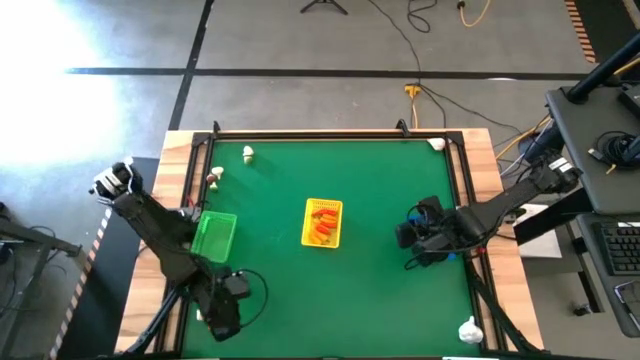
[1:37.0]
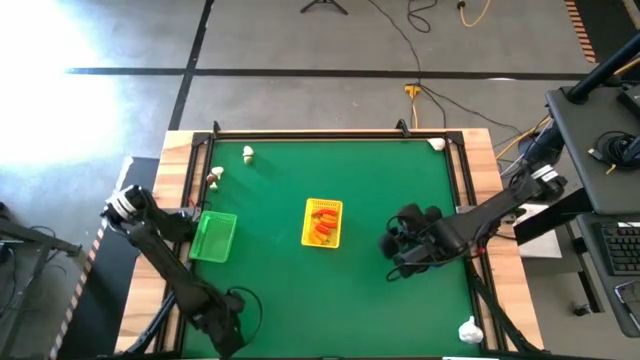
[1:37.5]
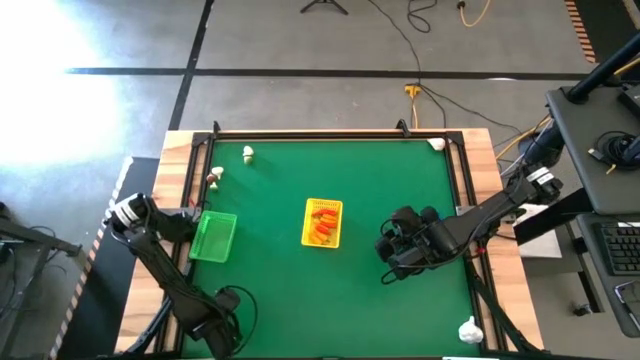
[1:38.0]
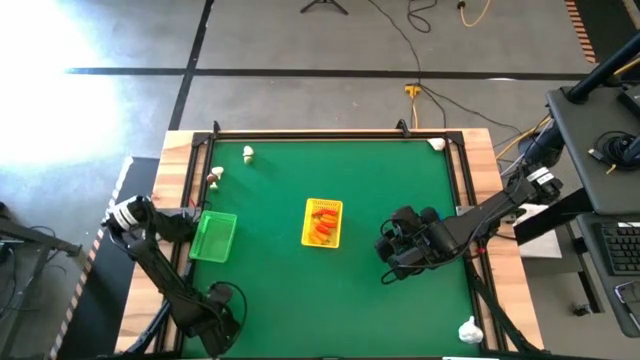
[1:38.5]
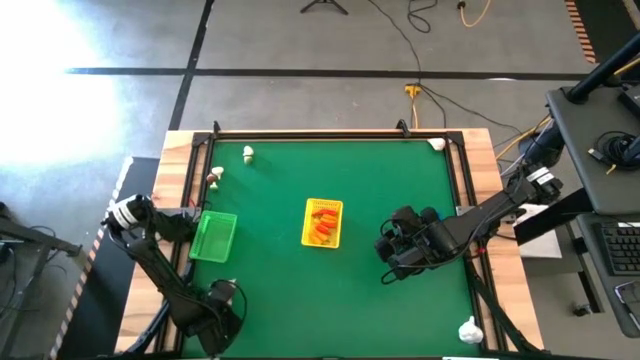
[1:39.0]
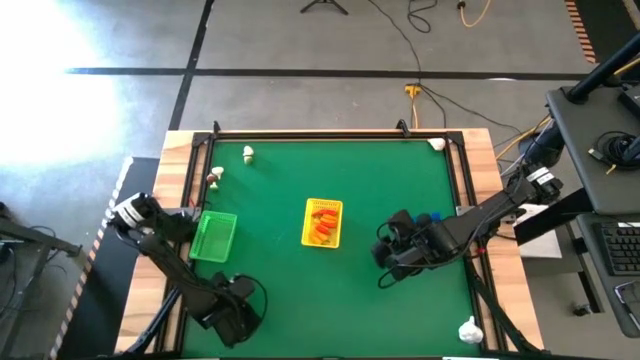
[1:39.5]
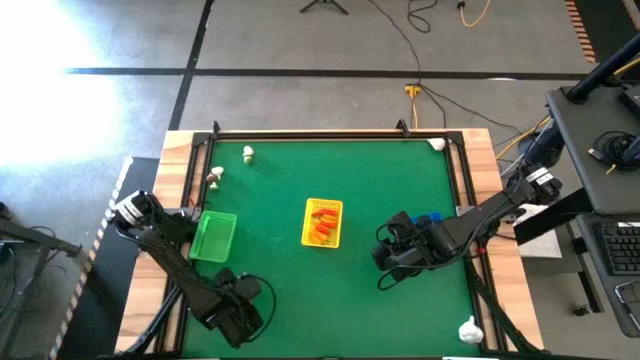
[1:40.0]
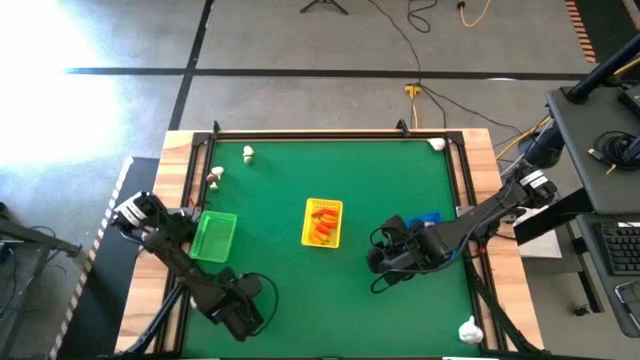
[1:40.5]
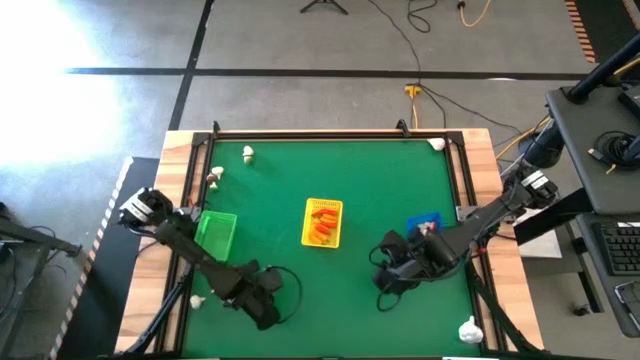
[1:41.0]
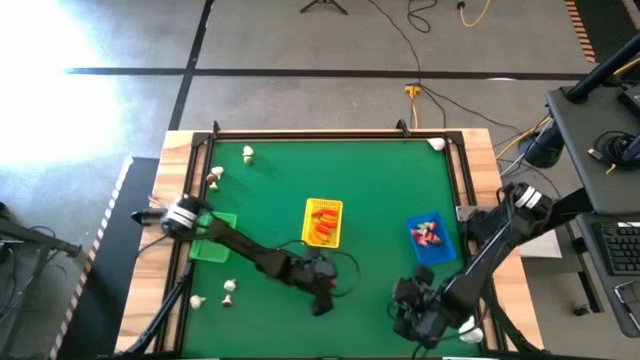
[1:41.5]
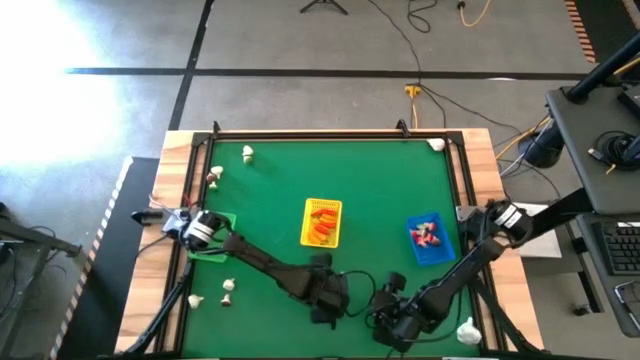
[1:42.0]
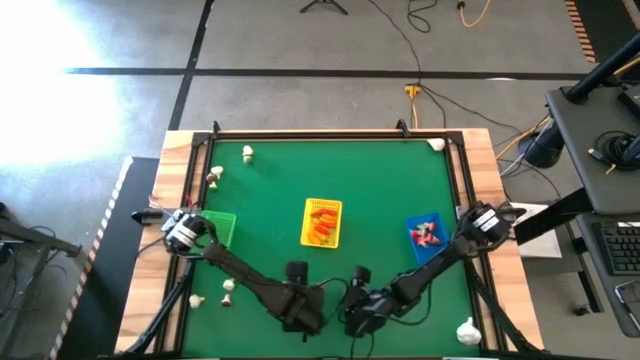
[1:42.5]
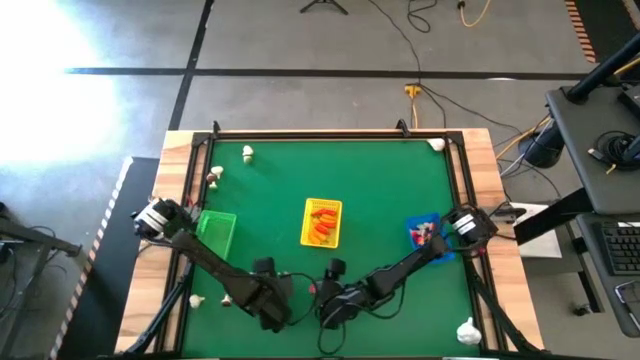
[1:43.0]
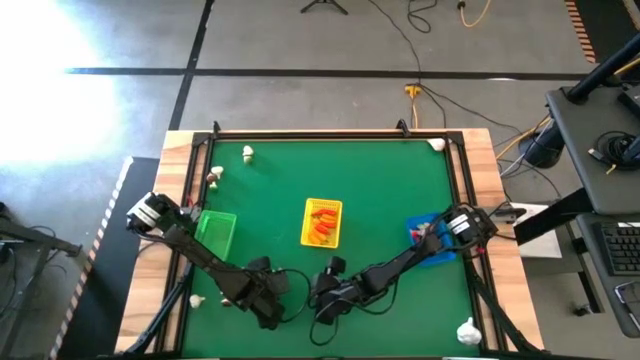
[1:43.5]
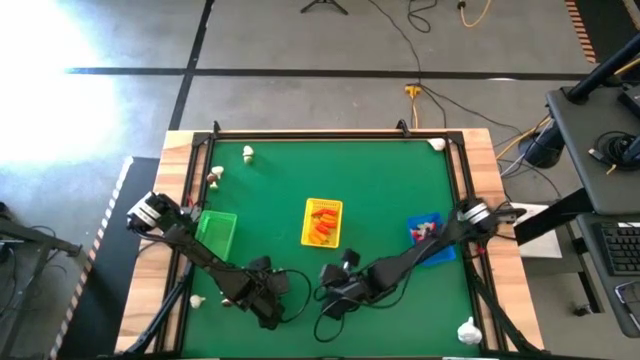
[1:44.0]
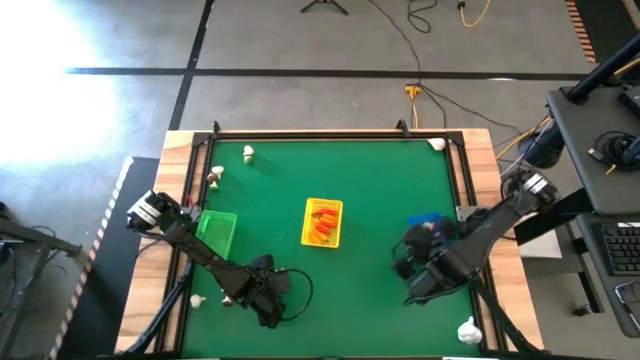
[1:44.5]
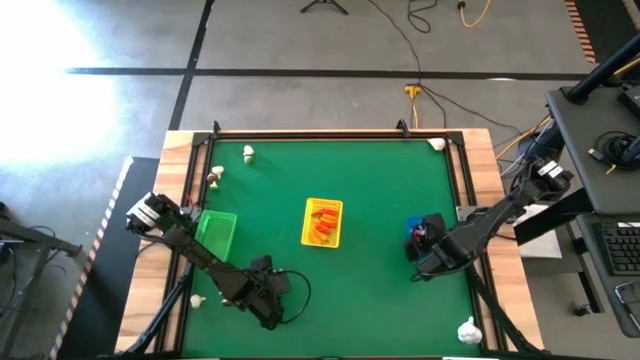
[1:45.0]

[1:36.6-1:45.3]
Task: Sort produce into baskets
Put the red mushroom into the blue bin

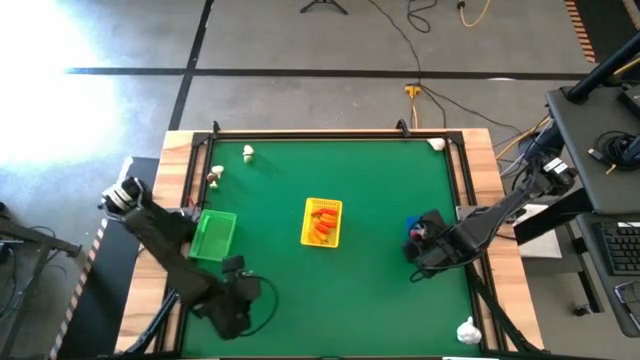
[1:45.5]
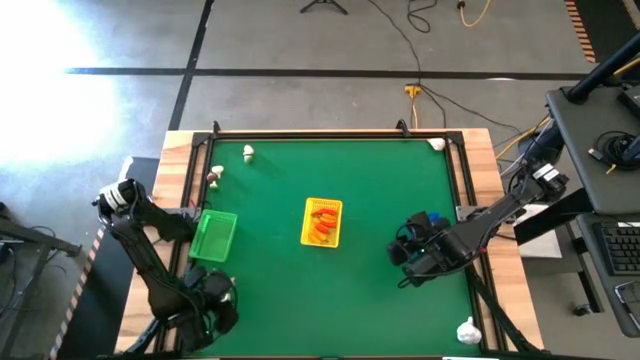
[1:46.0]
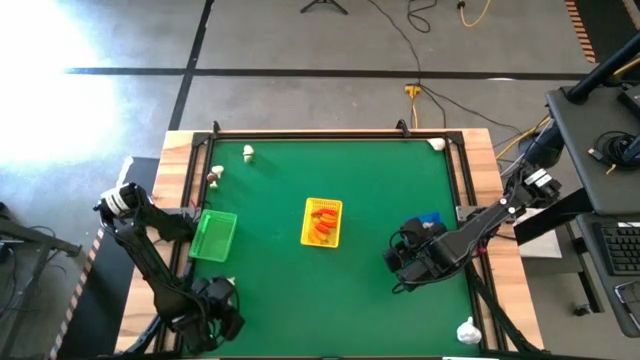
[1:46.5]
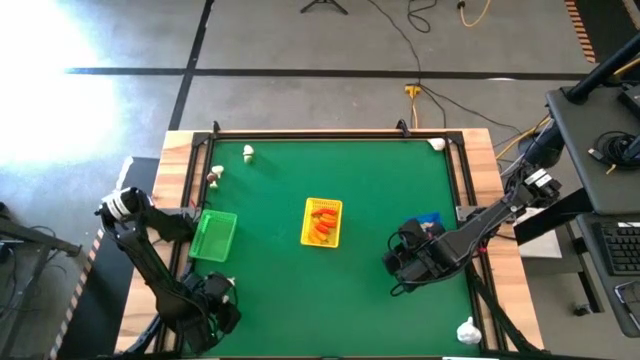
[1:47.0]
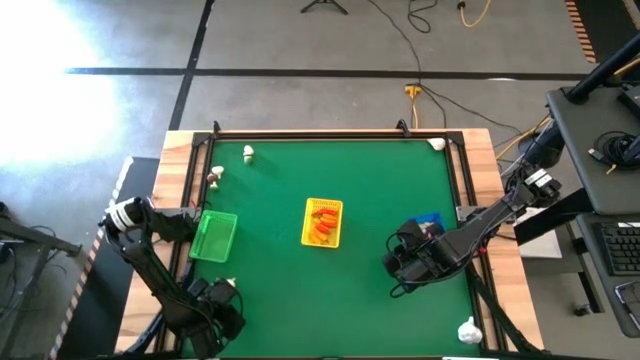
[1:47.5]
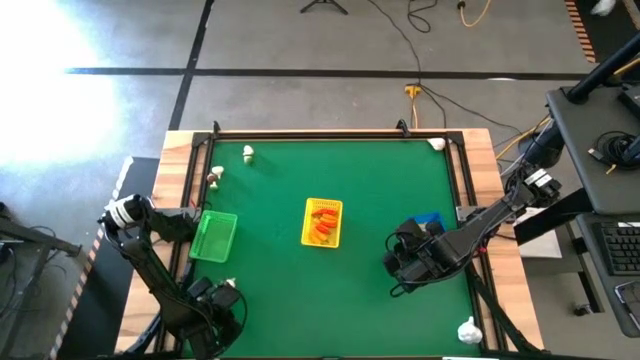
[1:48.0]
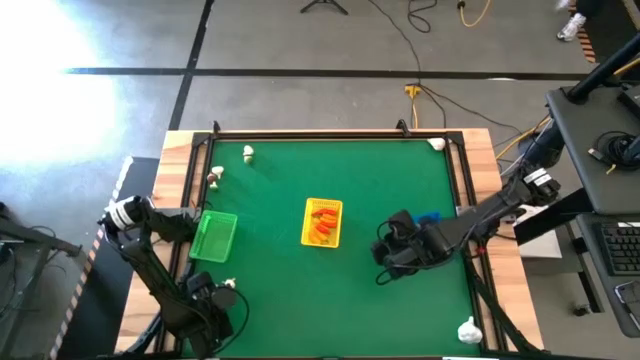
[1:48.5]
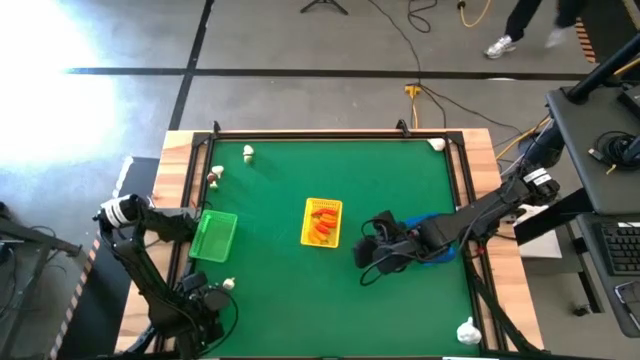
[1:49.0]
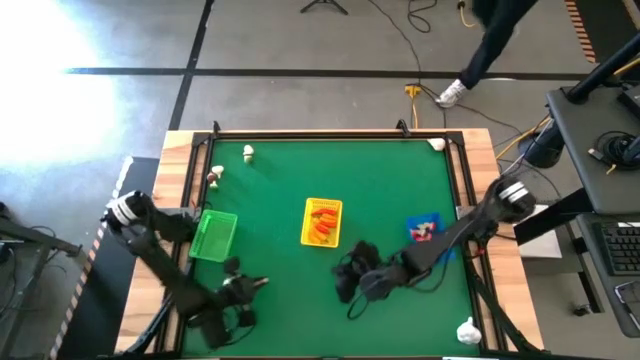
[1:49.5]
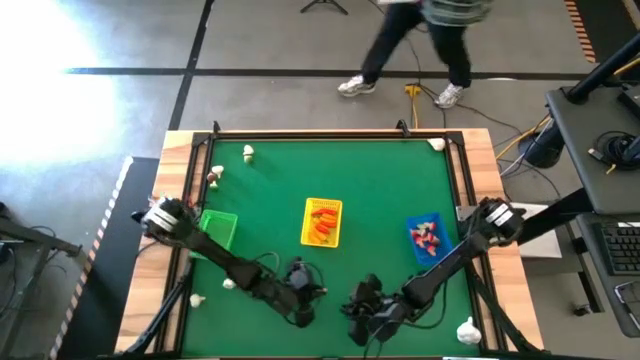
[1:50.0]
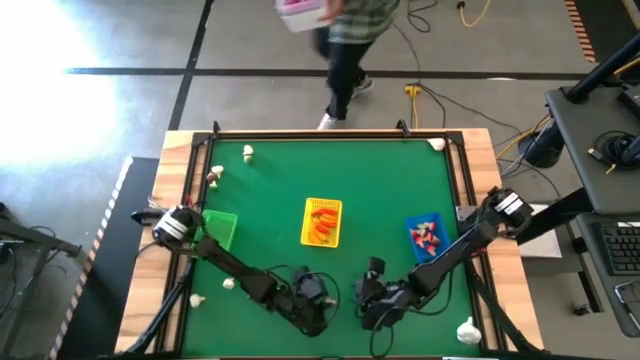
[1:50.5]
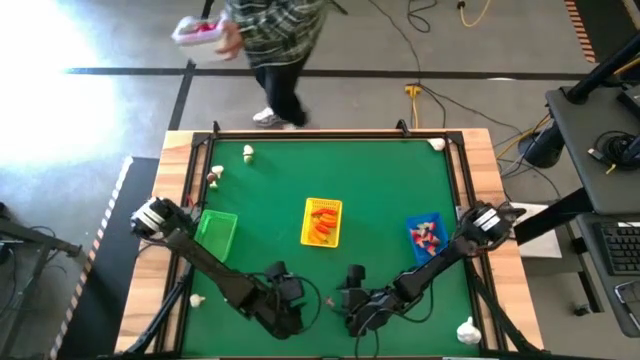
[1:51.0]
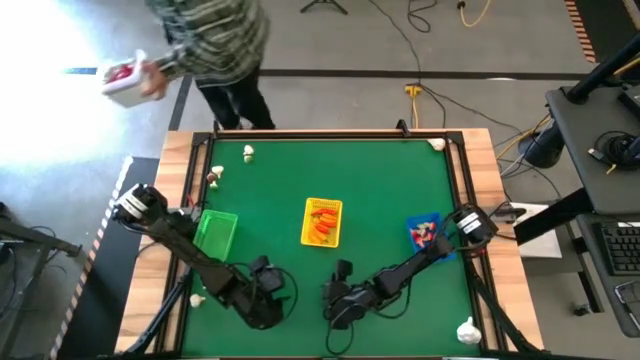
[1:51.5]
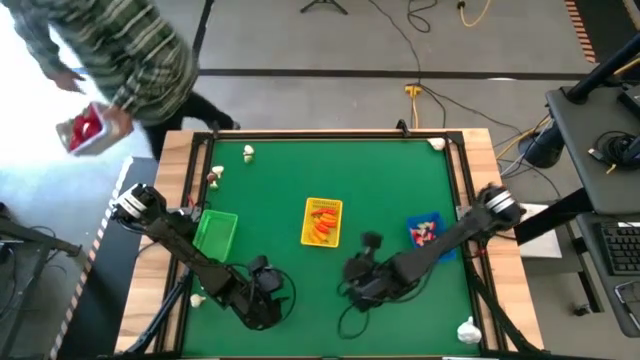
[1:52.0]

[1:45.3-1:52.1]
Put the brown mushroom into the blue bin

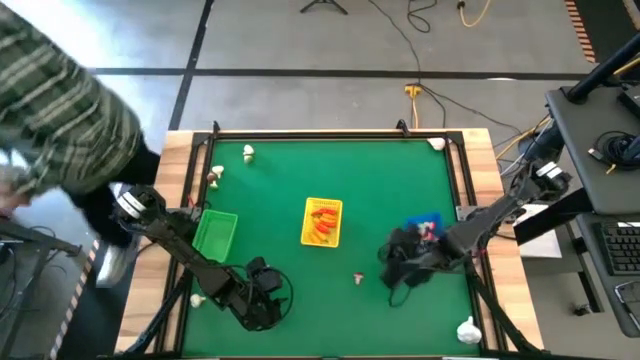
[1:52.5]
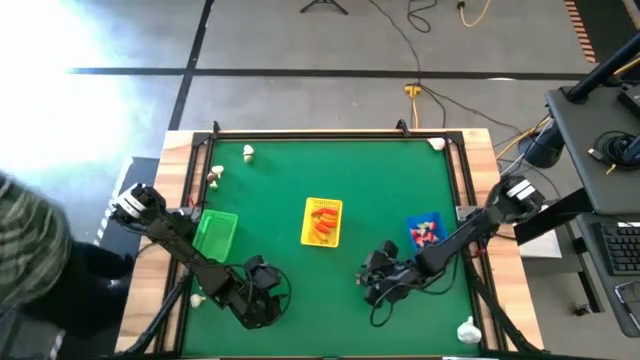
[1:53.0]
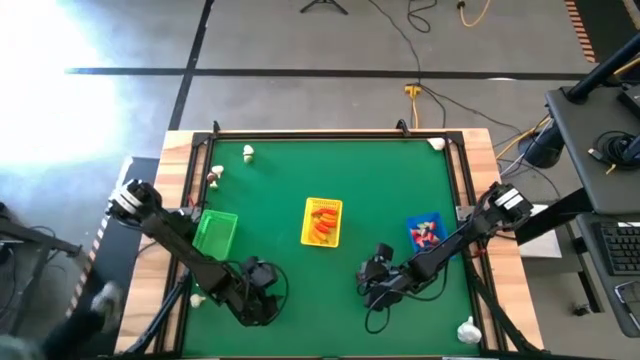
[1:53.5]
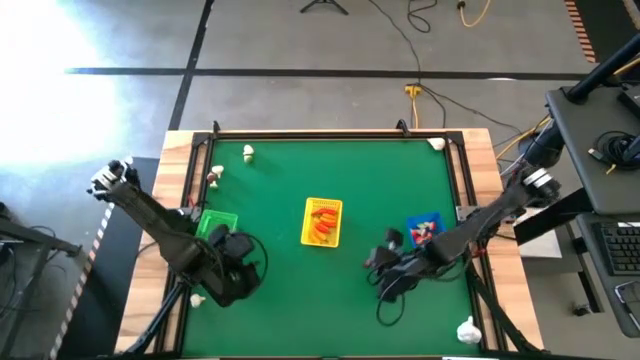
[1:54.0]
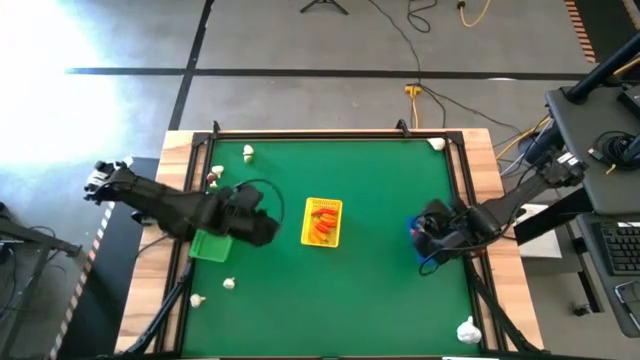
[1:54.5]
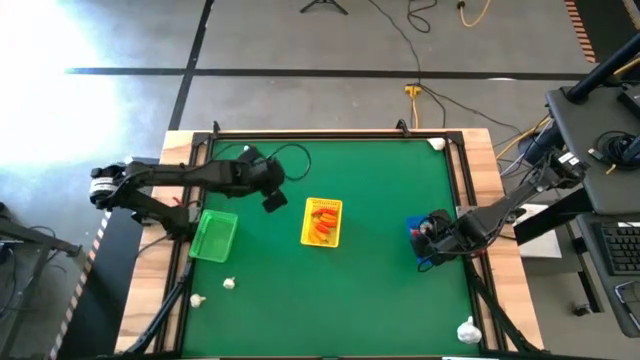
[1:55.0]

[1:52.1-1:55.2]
Put the brown mushroom into the blue bin

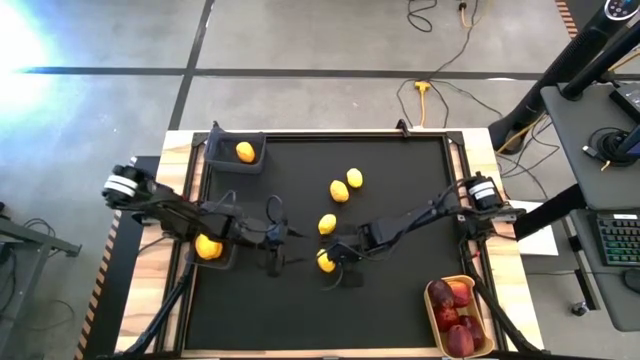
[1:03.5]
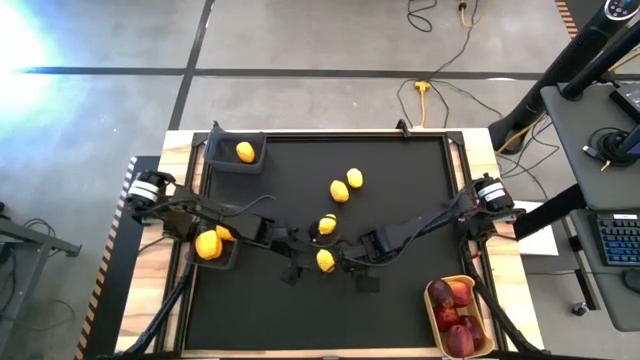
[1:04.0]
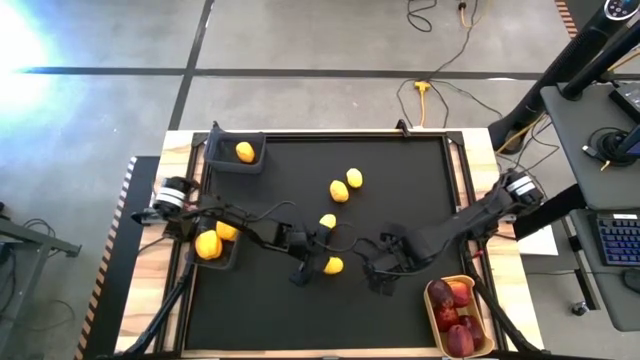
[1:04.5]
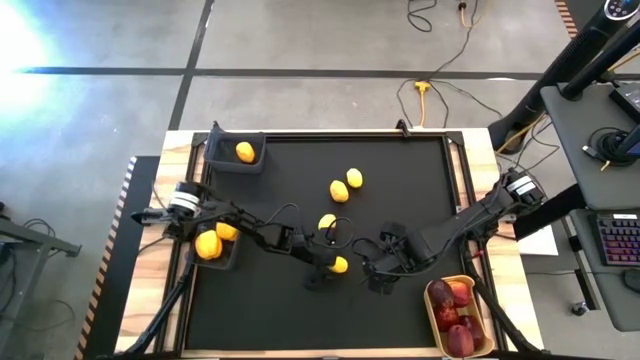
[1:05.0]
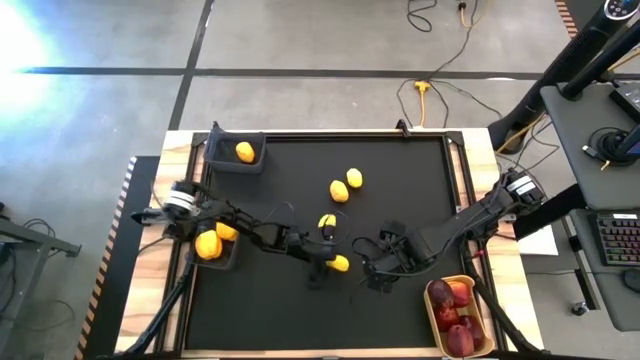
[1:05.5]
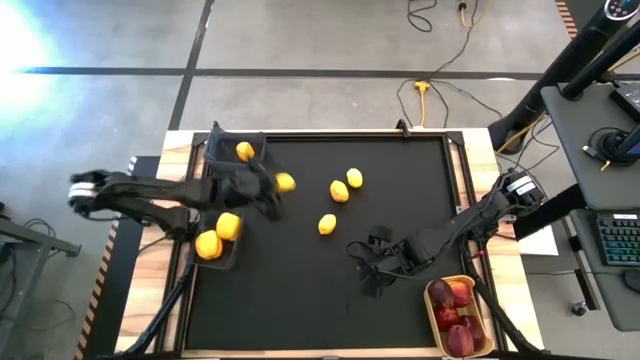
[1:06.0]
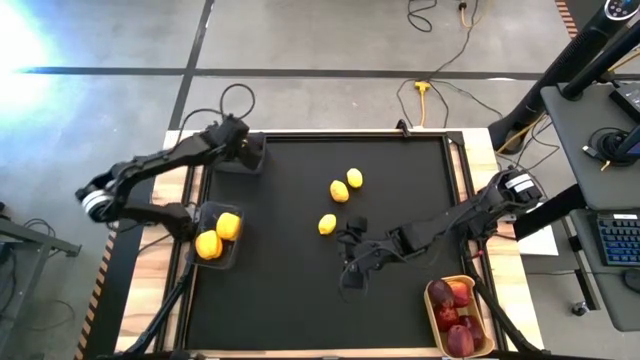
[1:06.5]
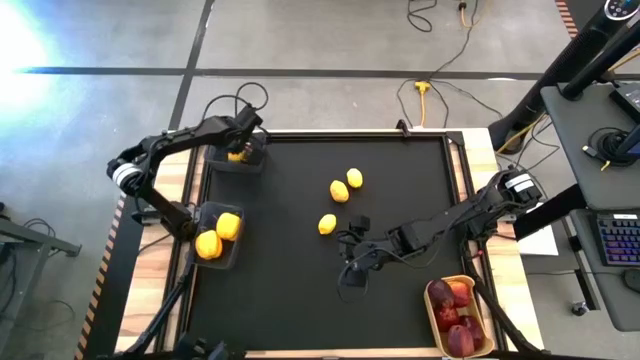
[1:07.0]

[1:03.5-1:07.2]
Task: Sort produce into baskets
Put the lemon into the top black bin
